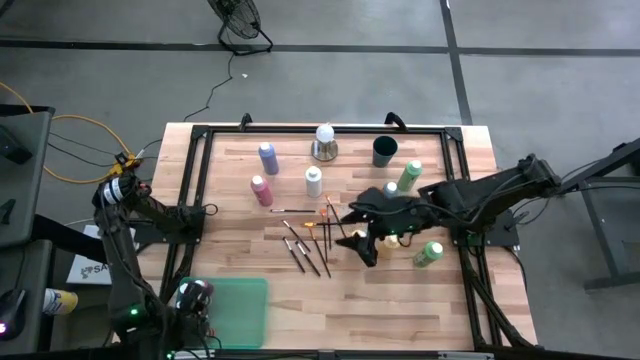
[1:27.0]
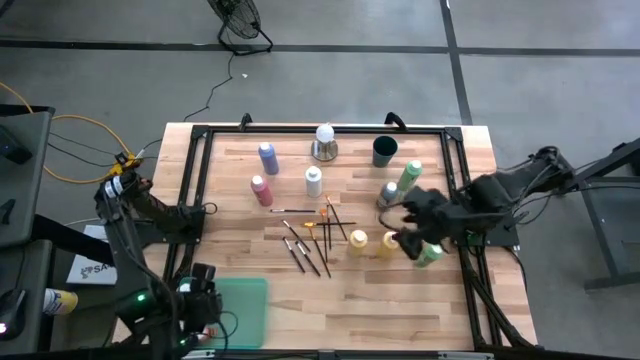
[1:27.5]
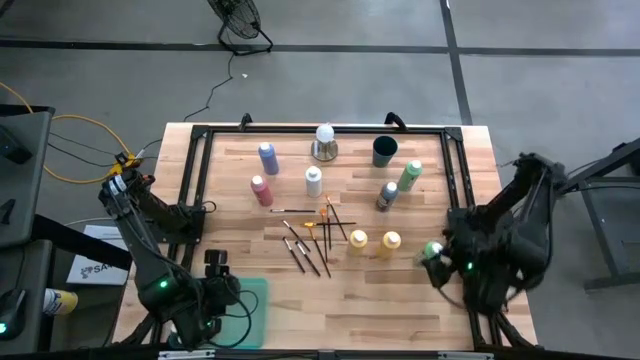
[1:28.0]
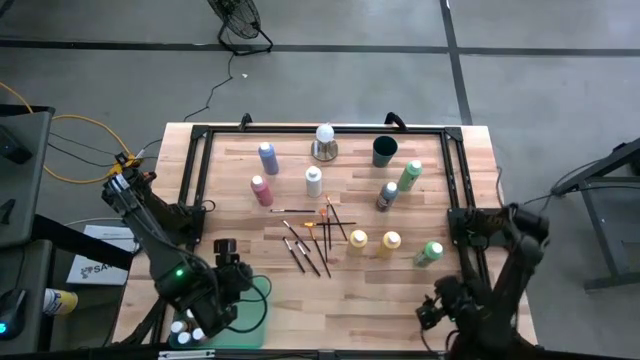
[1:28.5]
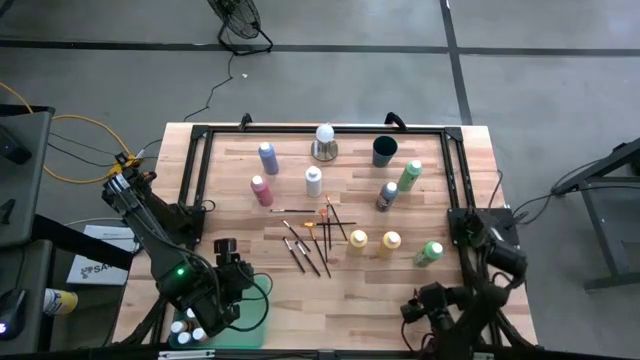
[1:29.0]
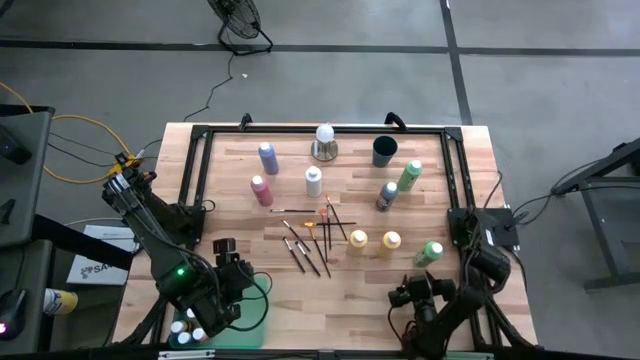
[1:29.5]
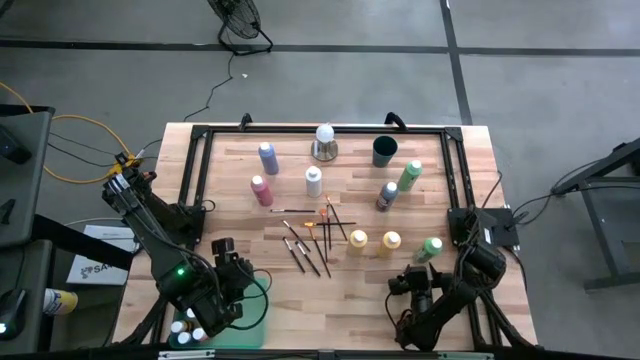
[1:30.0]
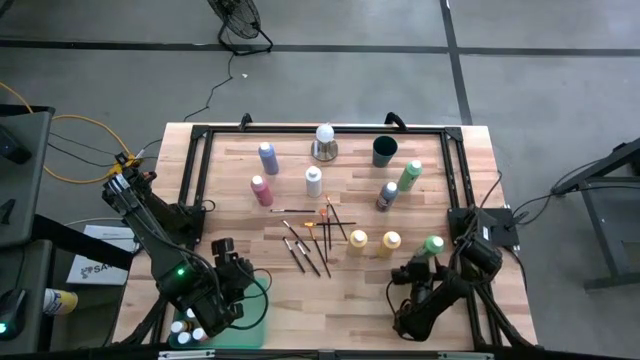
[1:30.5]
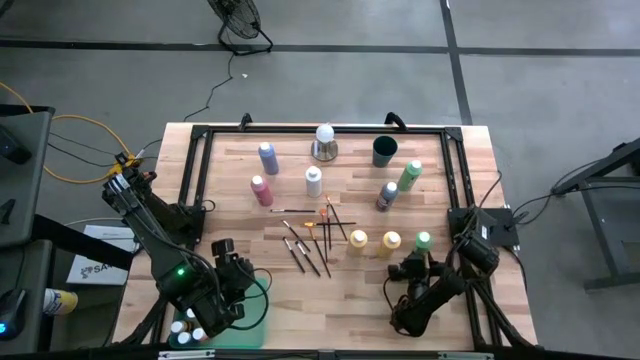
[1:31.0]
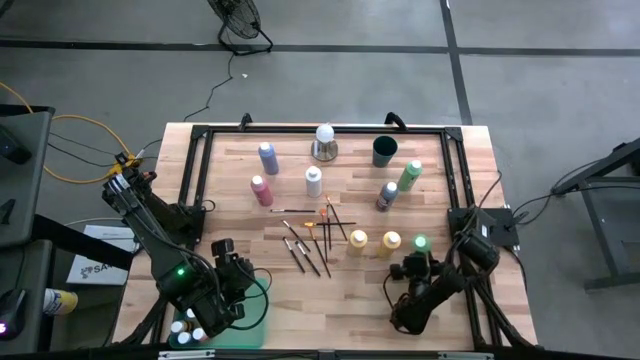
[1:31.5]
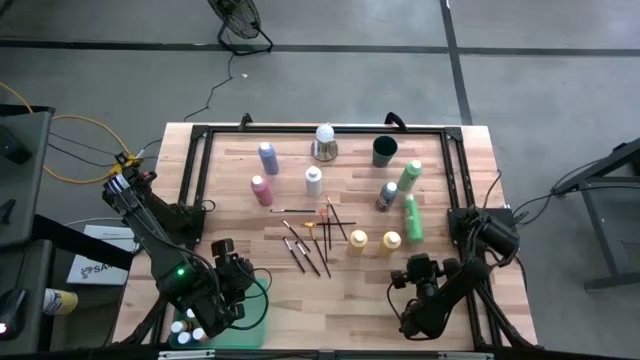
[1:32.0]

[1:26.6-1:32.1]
Task: Pick & Place Paint Supplies
Put the green paint bottle into the green bin

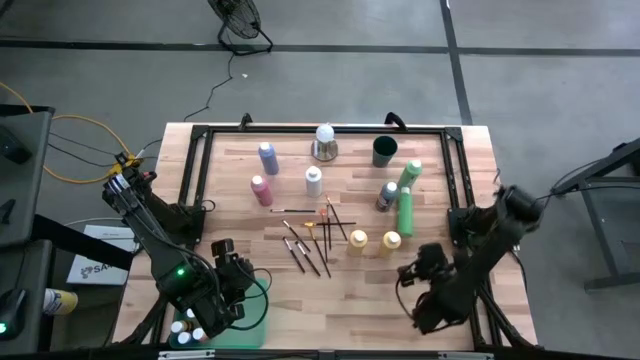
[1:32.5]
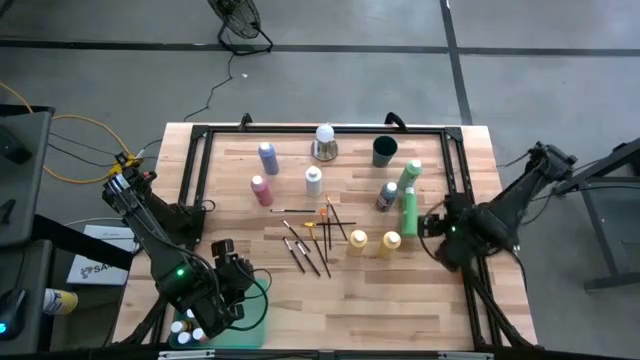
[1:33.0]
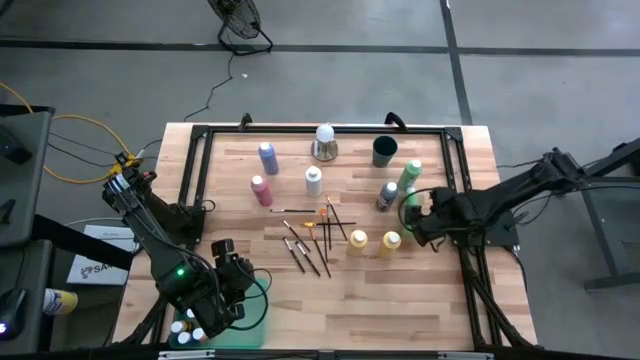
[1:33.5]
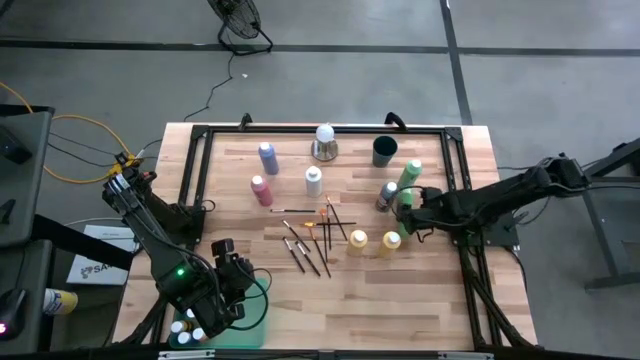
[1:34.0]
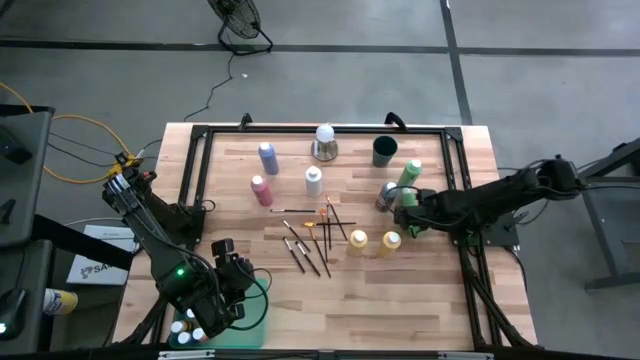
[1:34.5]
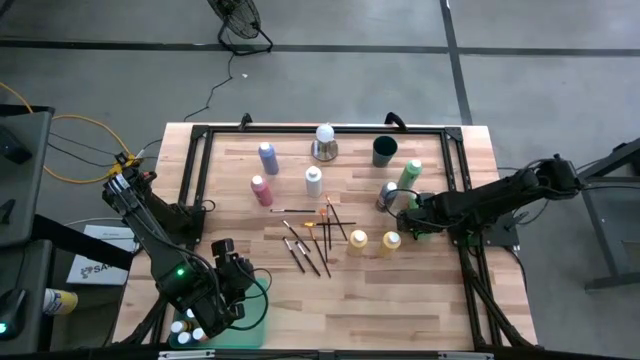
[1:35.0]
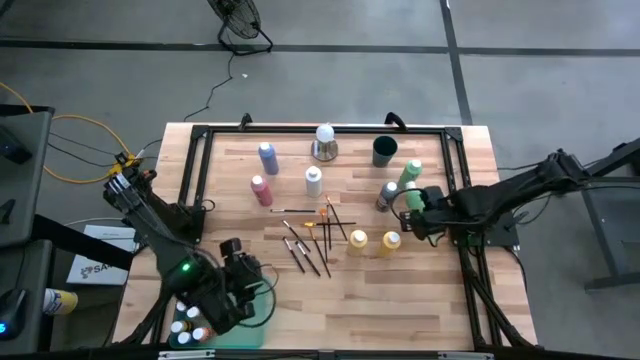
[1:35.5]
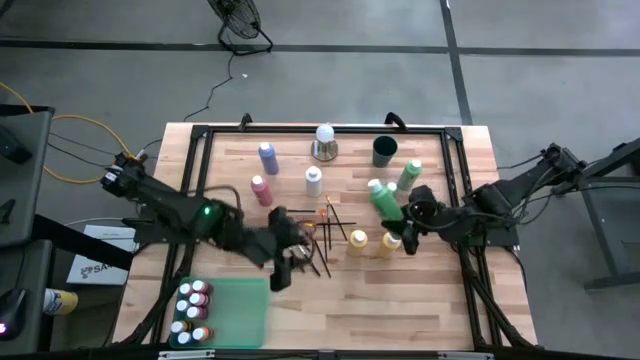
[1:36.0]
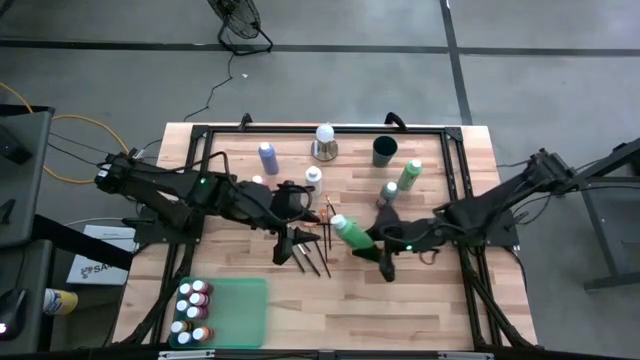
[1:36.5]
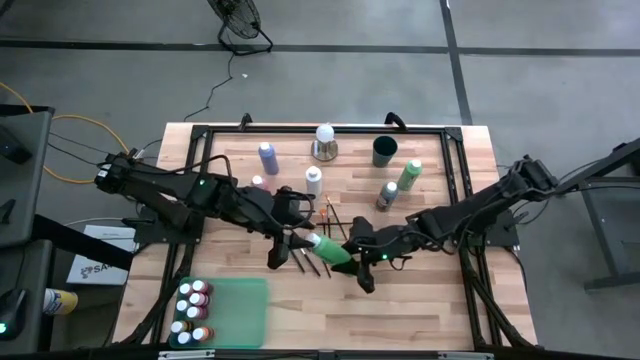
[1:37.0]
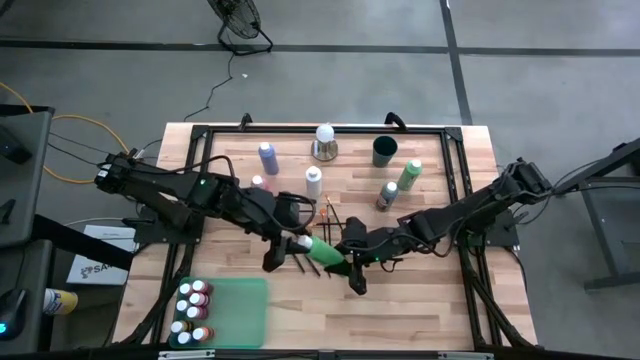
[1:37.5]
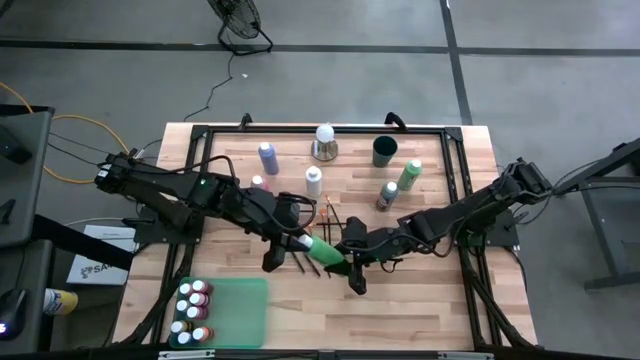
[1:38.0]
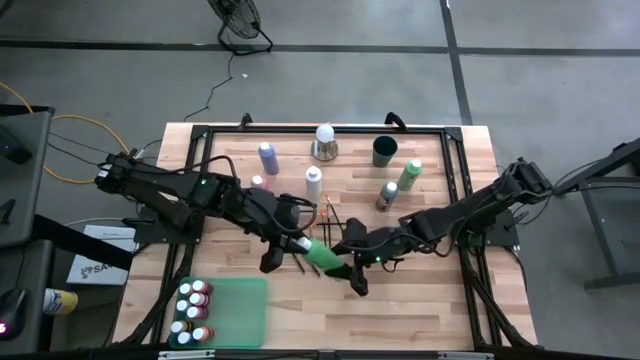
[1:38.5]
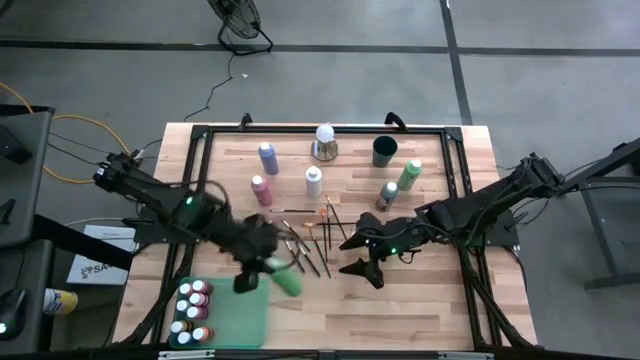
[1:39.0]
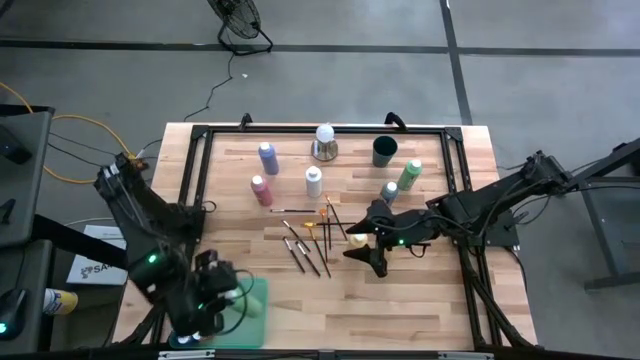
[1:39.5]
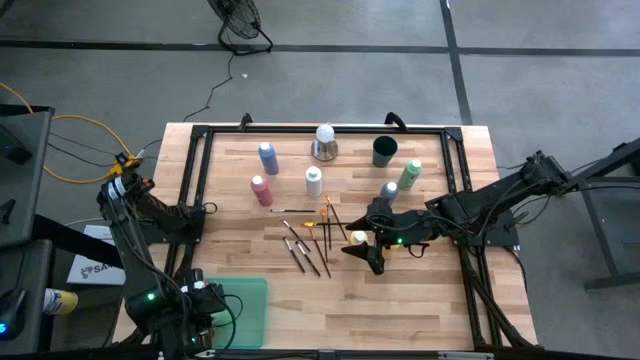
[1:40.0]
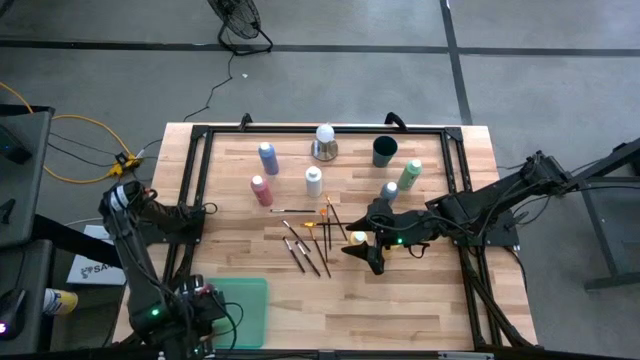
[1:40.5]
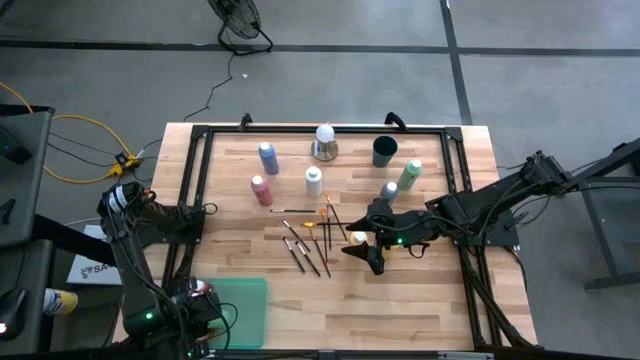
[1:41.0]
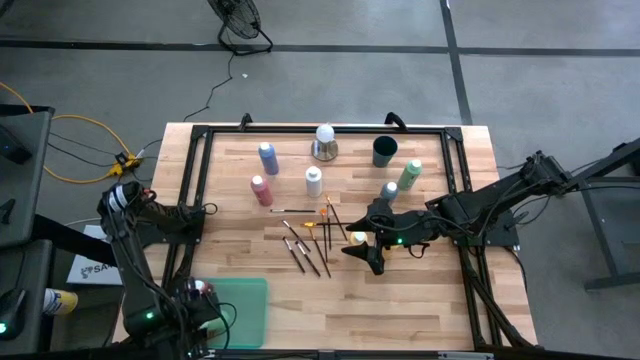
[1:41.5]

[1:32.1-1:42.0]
Put the green paint bottle into the green bin

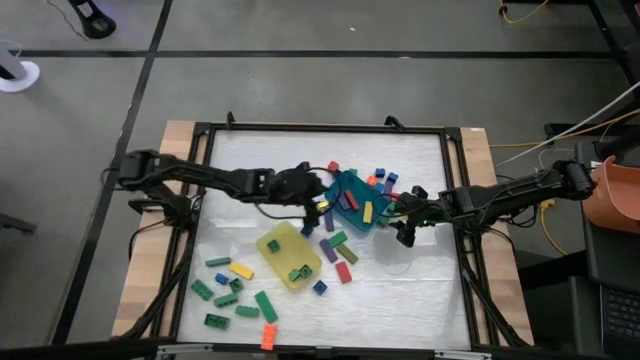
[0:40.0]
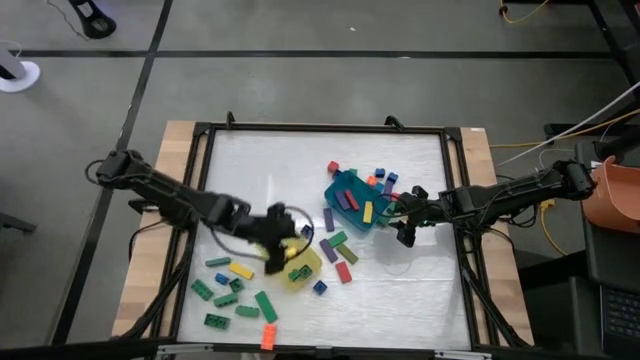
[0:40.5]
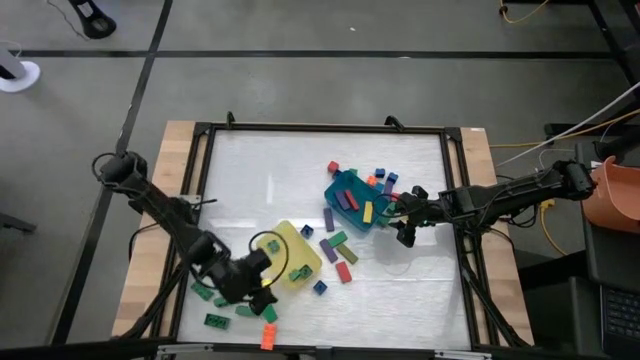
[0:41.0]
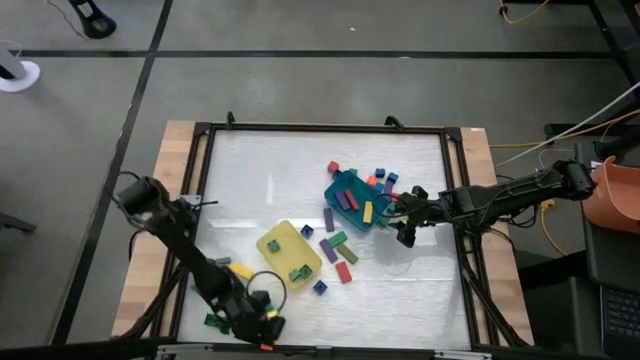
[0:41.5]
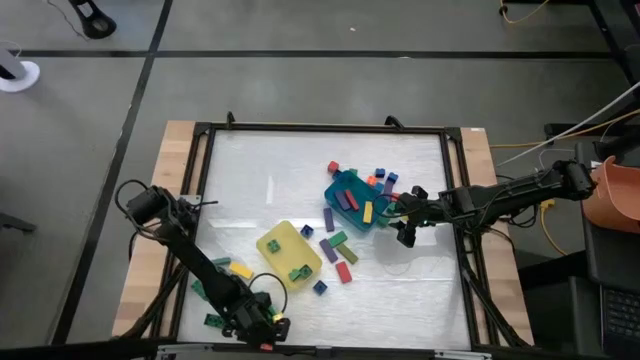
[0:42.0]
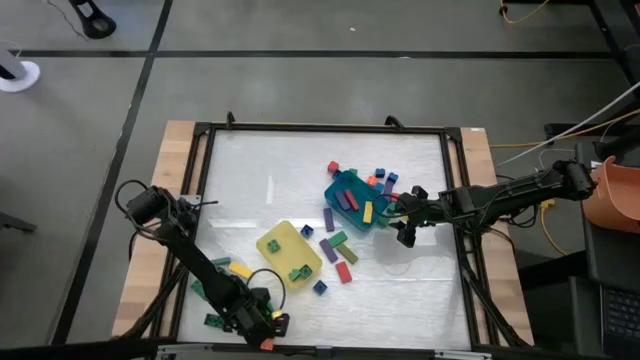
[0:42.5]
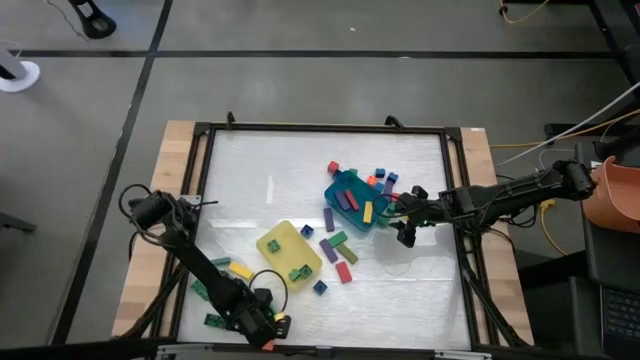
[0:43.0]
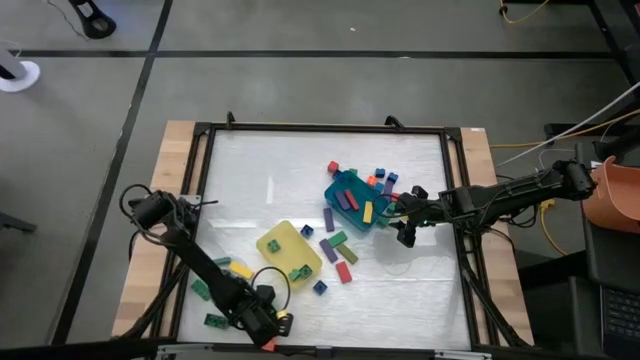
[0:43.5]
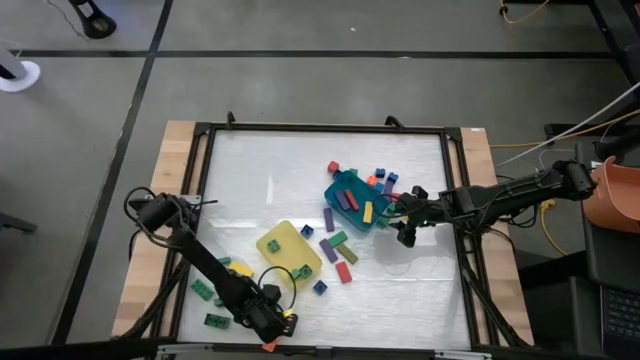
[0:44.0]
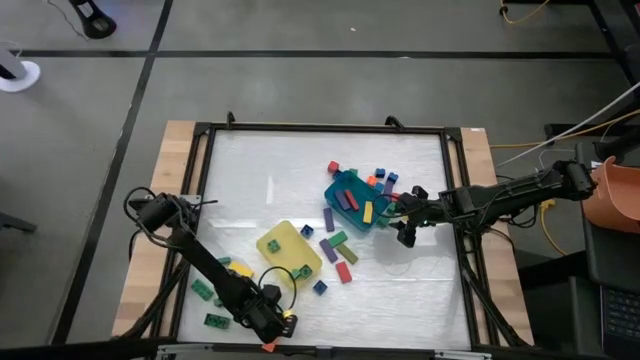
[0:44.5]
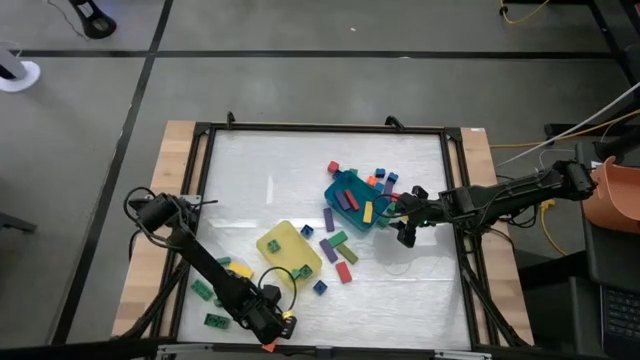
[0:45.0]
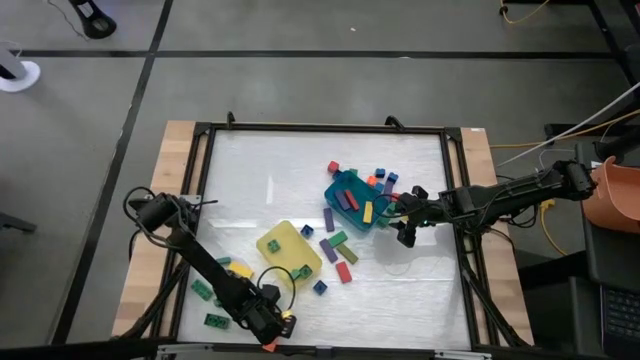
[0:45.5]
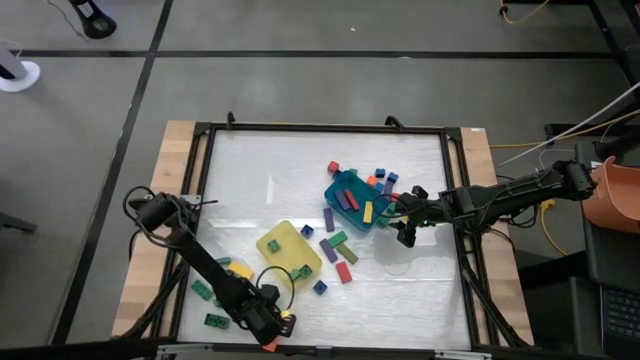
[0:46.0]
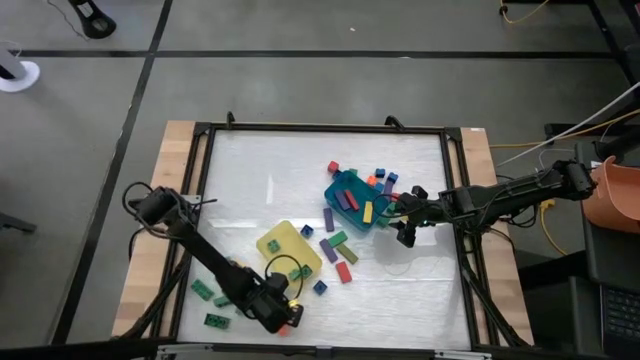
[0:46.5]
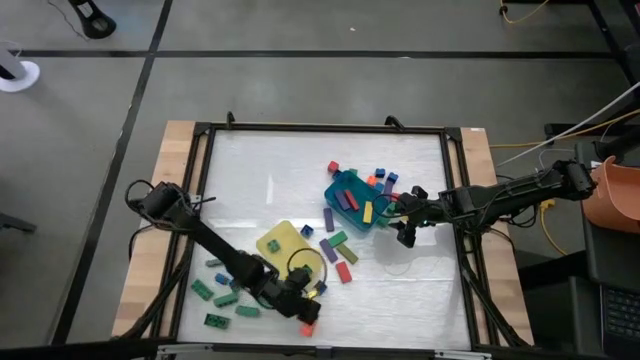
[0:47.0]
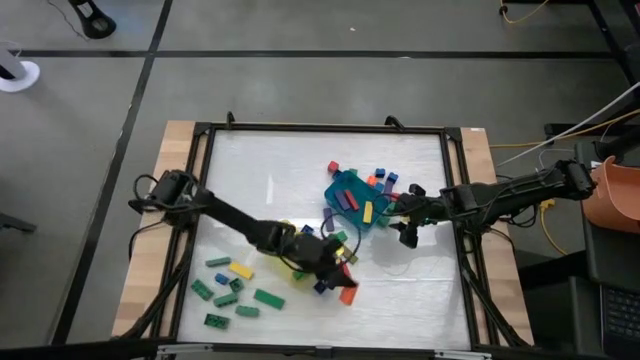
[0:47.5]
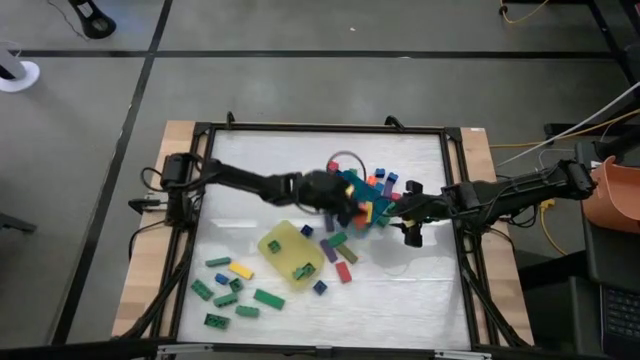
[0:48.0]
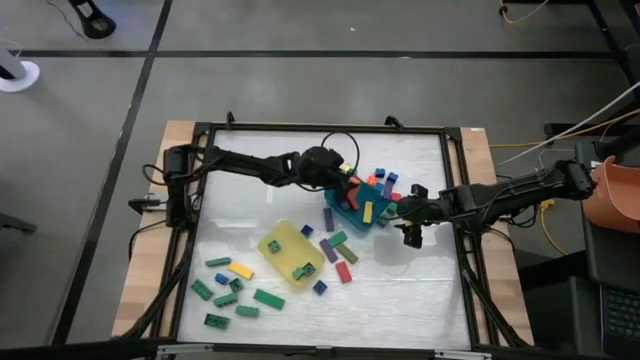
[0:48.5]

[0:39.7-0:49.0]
Task: Sort blocks by size
Put the large orange game piece into the blue bin
